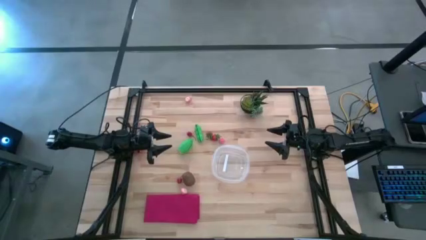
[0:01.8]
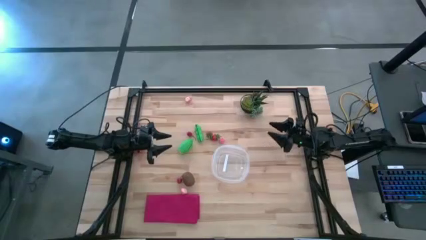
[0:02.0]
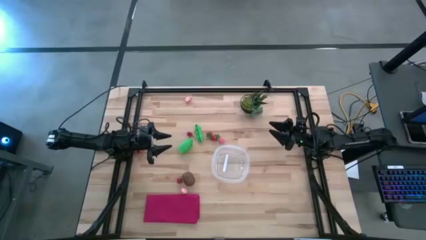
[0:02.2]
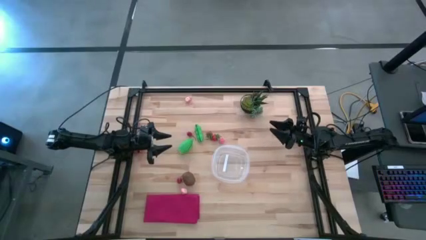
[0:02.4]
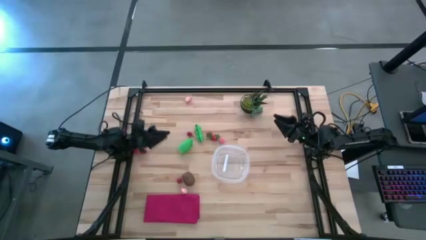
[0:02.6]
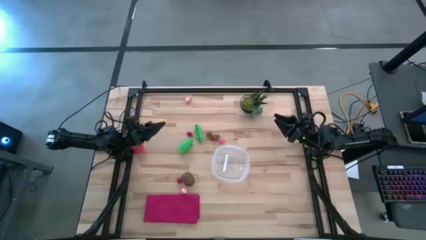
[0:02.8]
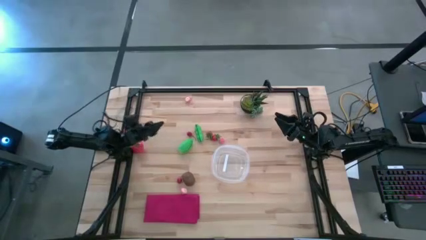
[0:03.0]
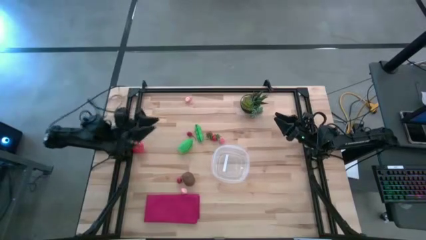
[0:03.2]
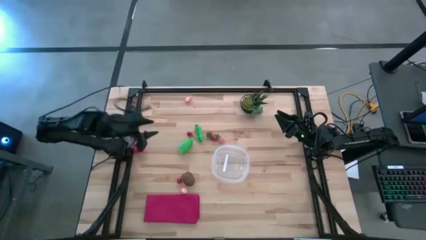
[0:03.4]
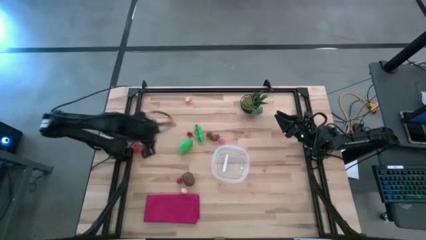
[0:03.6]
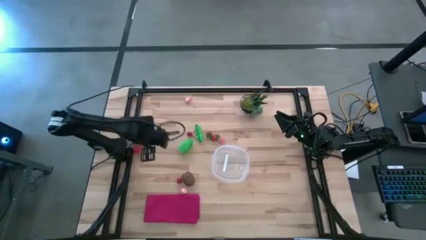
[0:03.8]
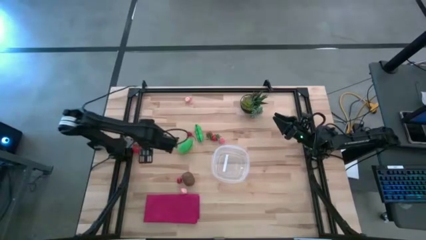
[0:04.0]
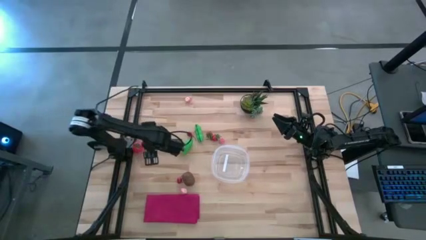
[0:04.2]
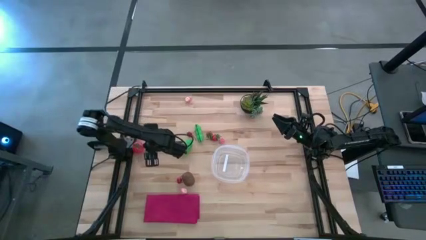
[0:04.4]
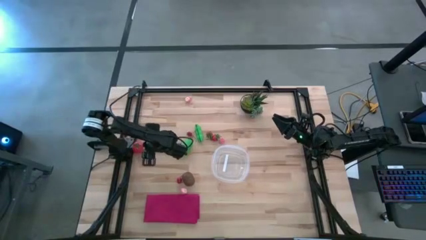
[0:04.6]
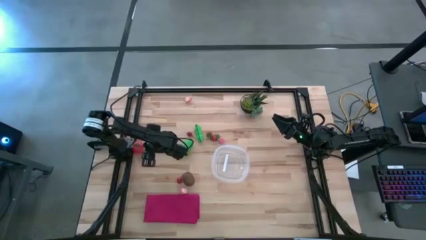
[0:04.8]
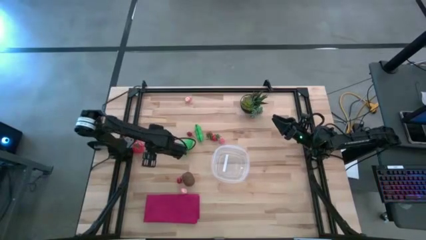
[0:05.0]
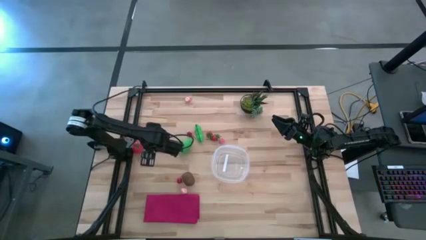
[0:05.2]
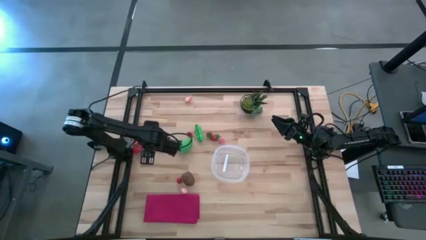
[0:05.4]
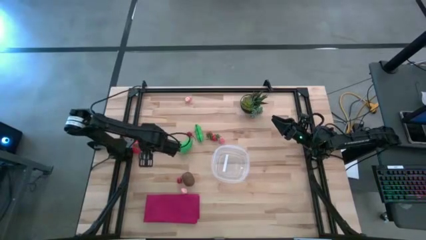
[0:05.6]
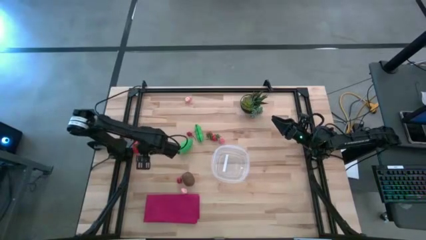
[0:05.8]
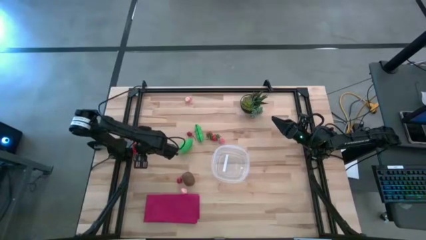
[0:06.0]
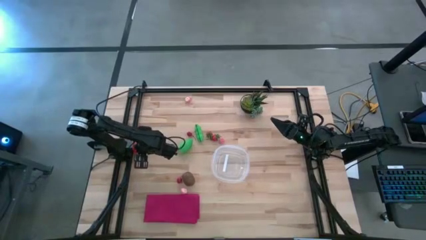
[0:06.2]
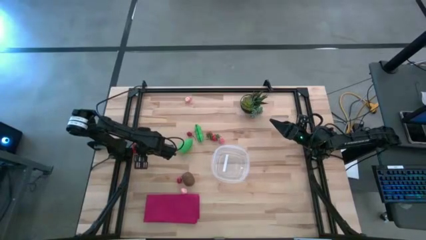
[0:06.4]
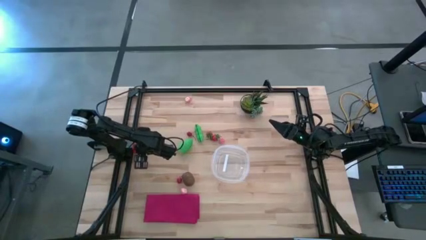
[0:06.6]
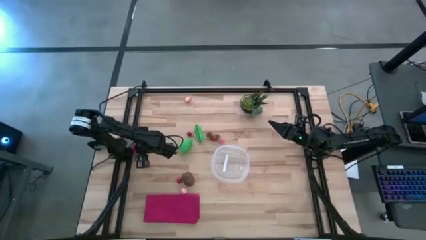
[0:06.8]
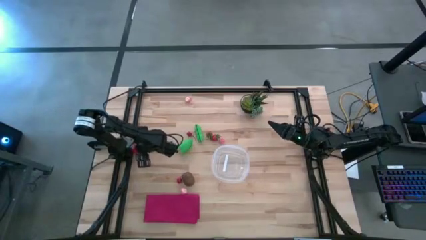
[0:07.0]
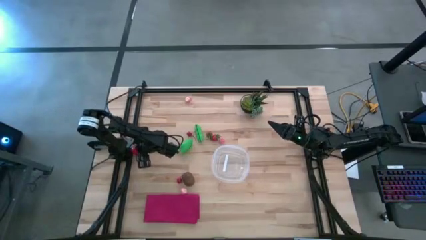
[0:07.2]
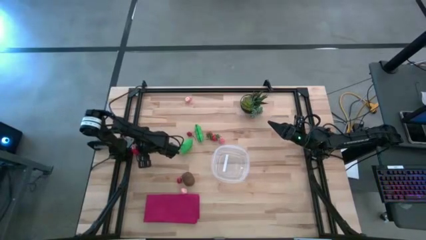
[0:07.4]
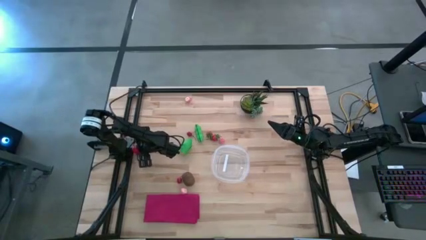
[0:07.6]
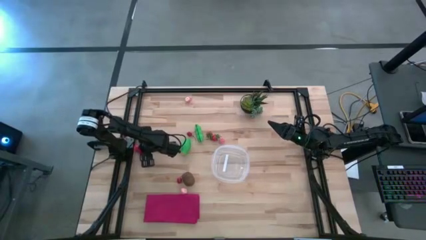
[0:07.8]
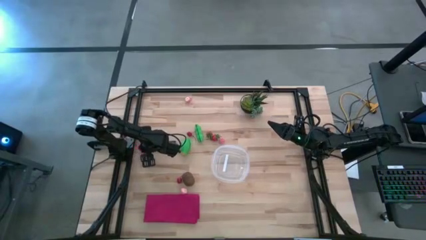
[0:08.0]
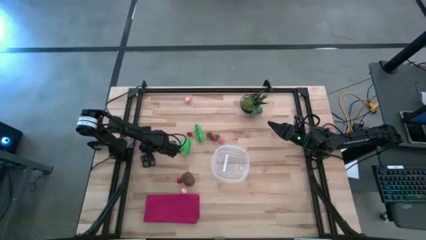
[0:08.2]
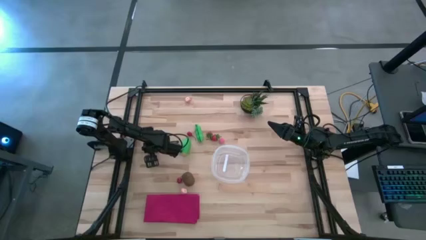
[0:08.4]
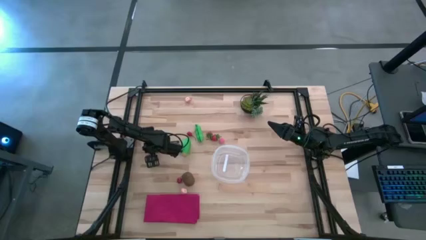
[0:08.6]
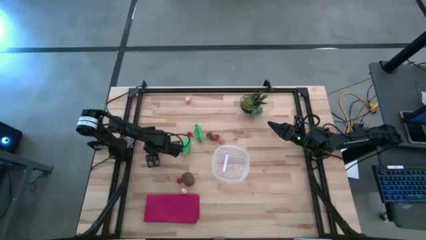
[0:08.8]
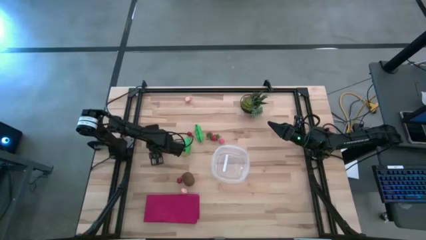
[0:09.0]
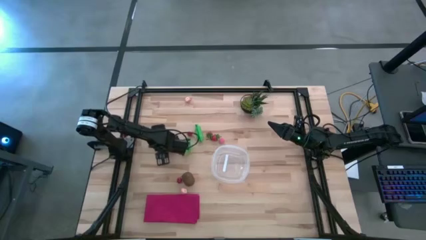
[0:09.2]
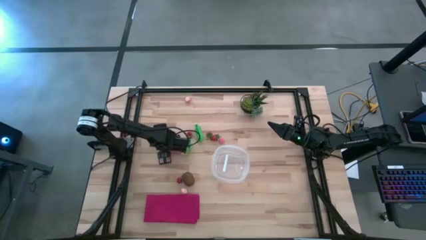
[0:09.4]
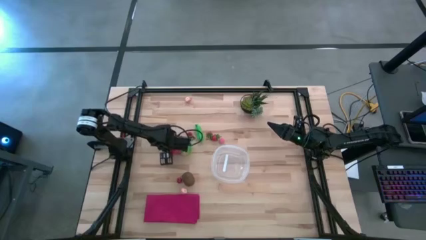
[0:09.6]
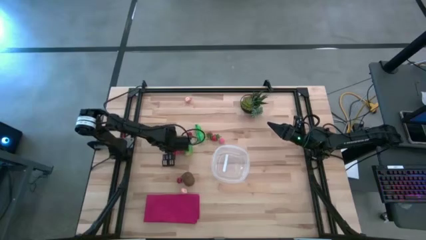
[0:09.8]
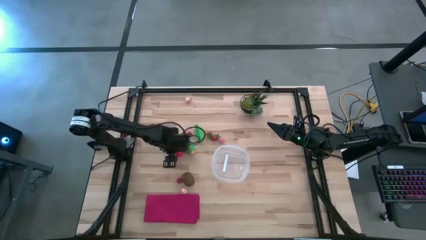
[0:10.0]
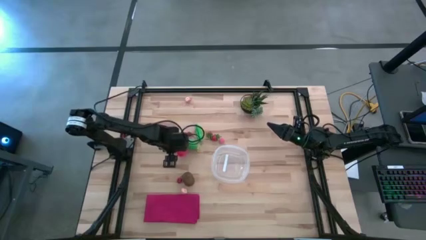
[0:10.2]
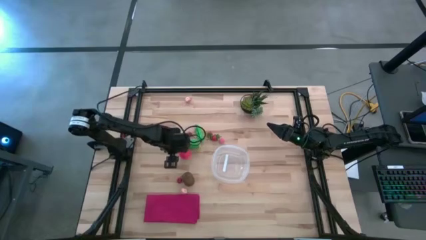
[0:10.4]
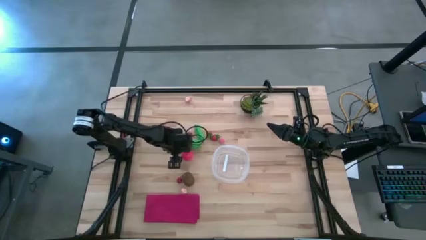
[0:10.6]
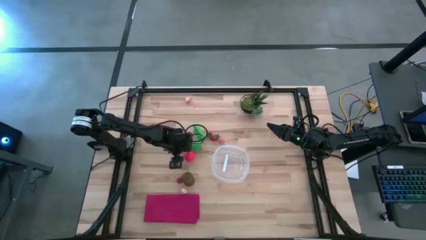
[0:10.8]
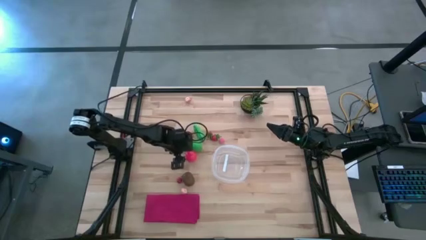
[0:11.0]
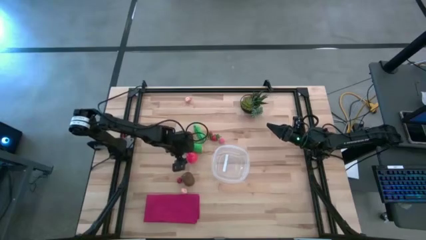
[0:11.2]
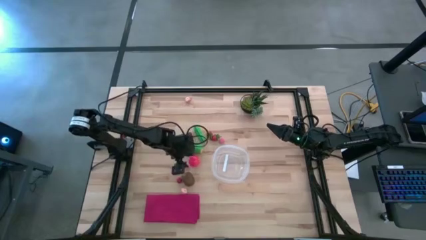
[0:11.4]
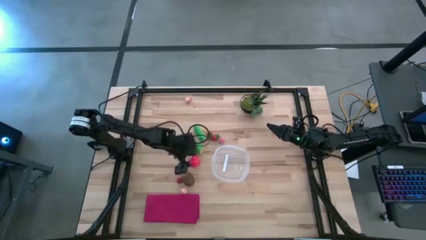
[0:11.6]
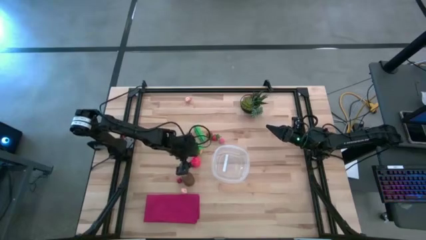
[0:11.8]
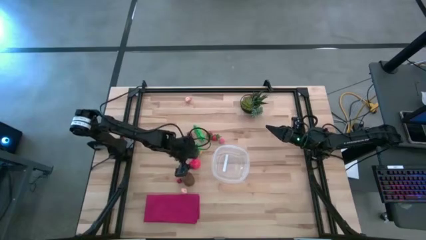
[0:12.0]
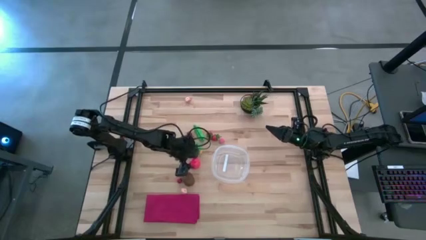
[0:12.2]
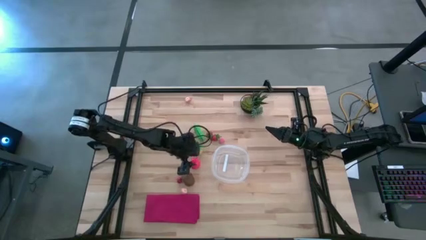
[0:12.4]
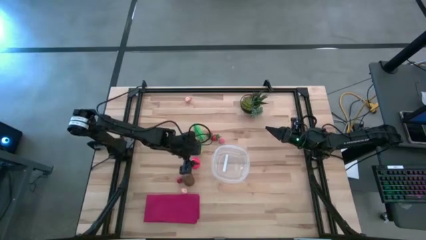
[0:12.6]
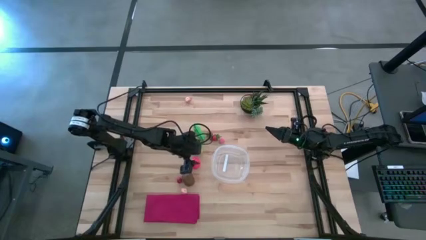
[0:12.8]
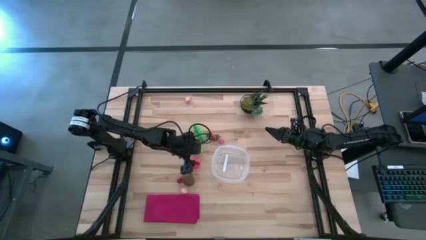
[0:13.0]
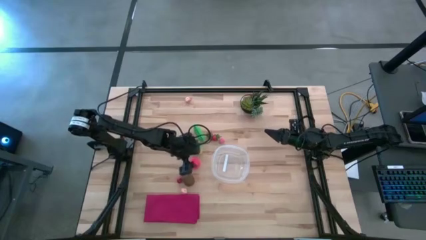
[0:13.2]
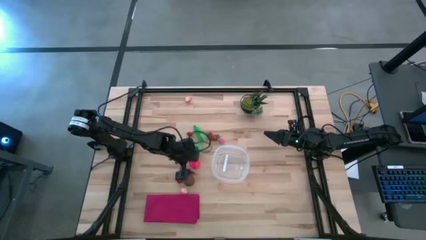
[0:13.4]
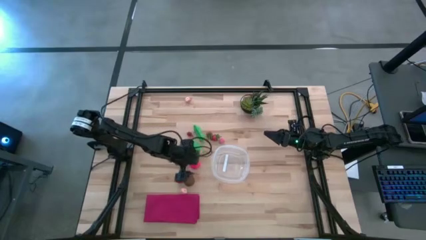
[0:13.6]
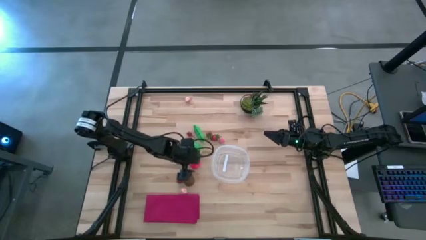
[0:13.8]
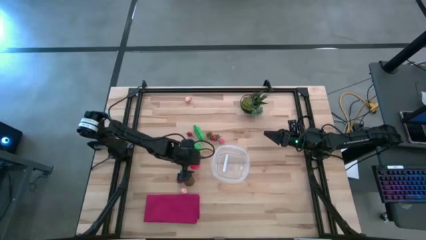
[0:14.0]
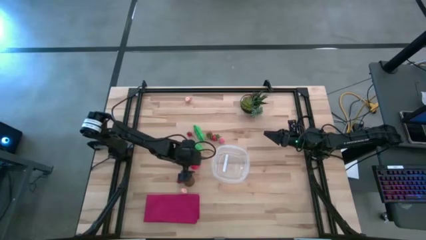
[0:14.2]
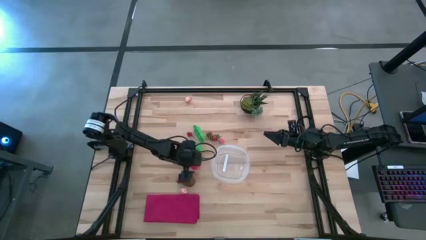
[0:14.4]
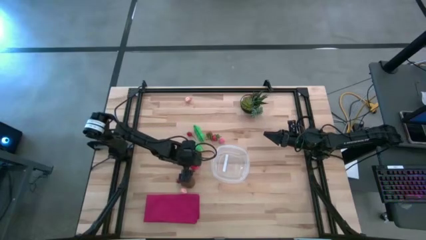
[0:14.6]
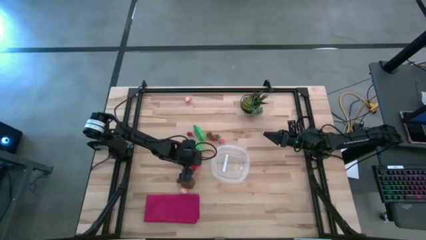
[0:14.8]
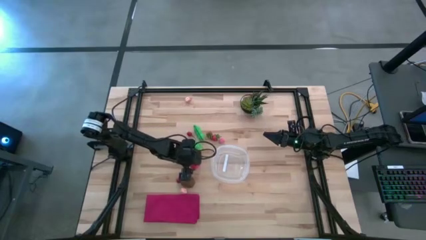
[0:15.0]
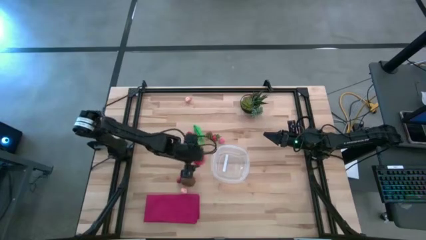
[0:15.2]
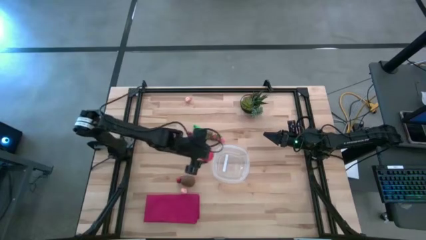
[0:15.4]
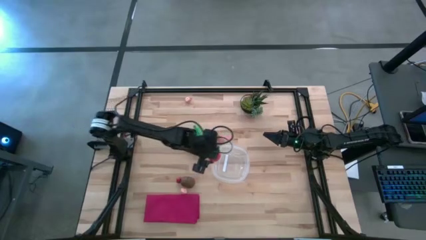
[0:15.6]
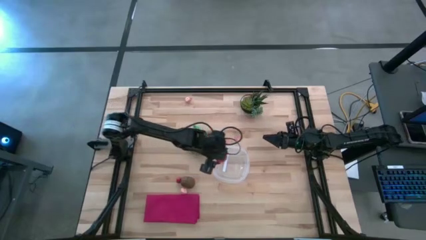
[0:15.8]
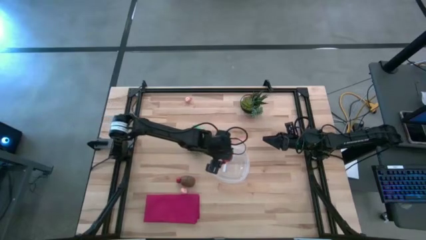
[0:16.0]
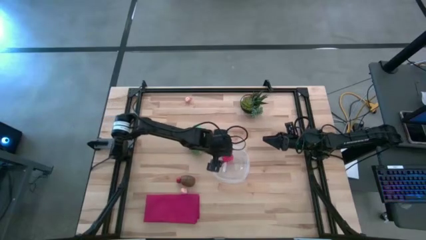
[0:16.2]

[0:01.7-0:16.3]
Task: Pick and placing Produce into tupperware
Put the tomato into the transparent container

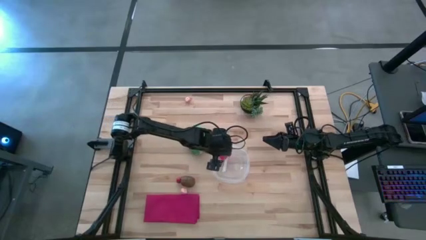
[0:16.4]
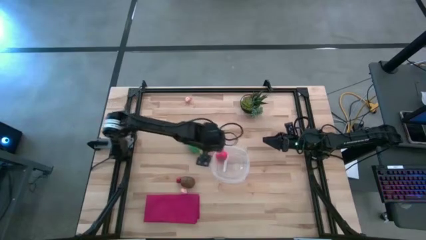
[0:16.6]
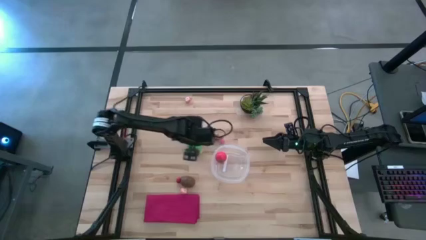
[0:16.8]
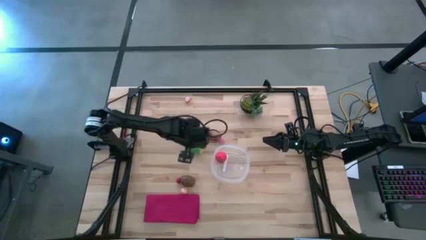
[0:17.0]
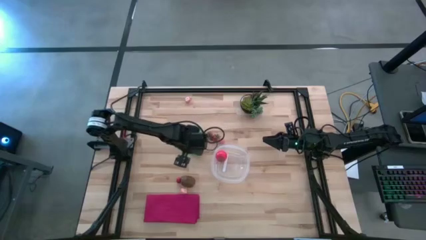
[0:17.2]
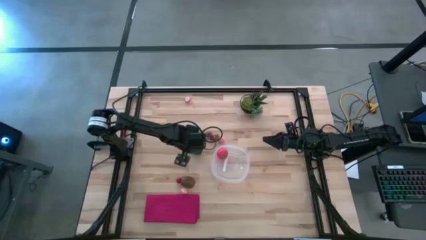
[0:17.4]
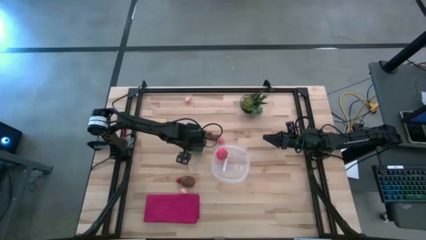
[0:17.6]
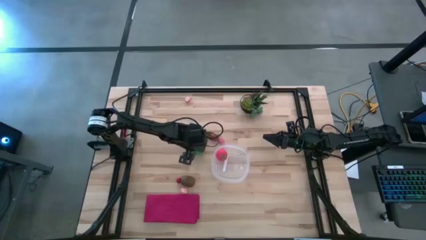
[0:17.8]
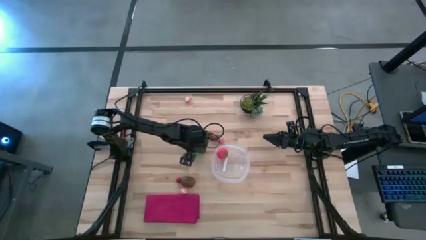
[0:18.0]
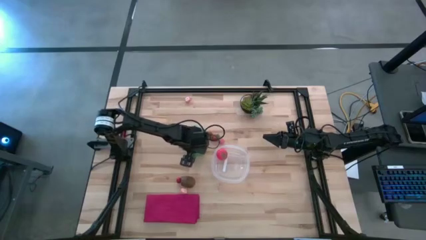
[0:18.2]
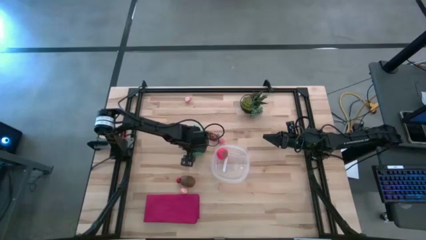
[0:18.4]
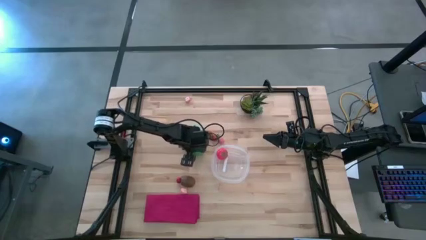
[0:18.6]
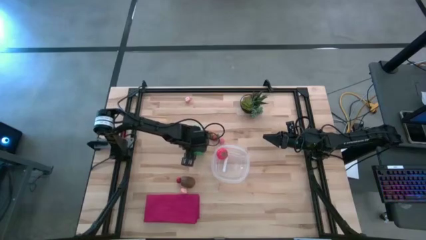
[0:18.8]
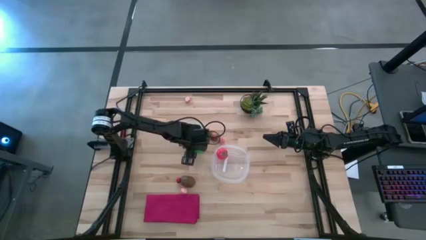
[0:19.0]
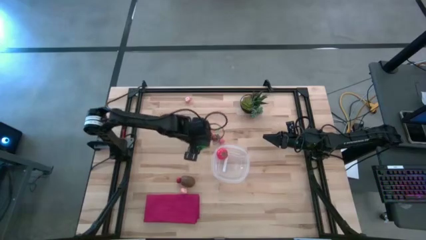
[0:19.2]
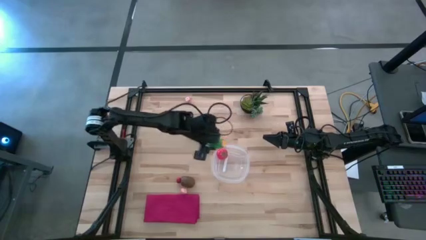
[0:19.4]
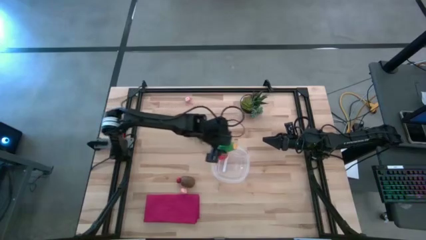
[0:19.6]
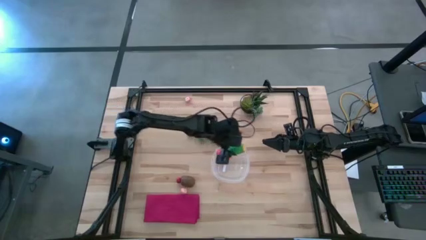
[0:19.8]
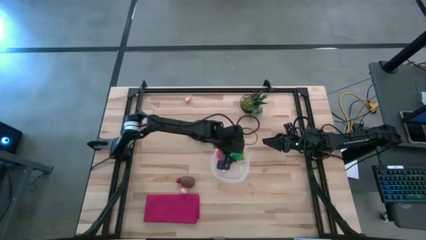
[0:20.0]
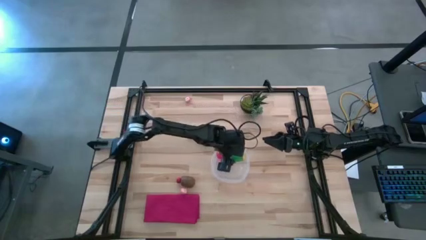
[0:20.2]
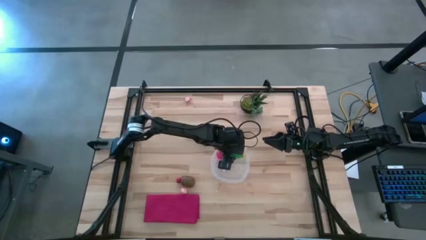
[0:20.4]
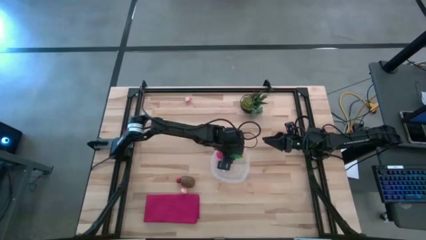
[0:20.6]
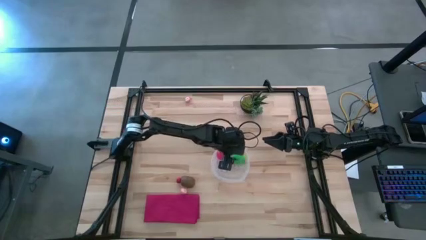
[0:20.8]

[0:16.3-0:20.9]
Put the corn into the transparent container
